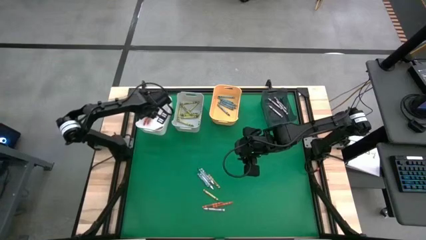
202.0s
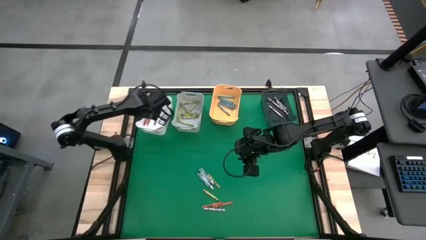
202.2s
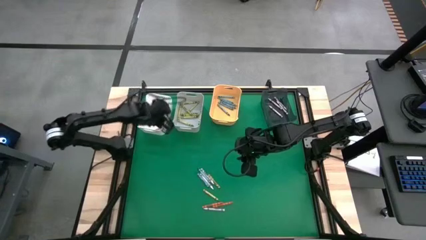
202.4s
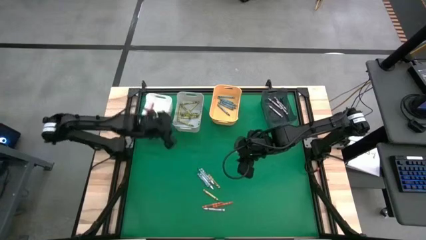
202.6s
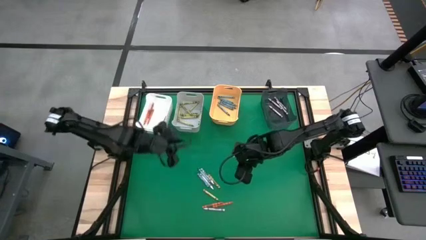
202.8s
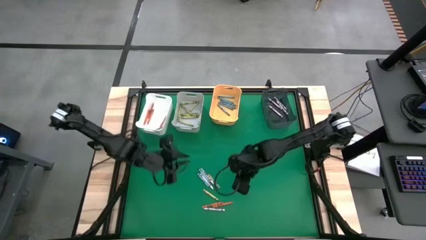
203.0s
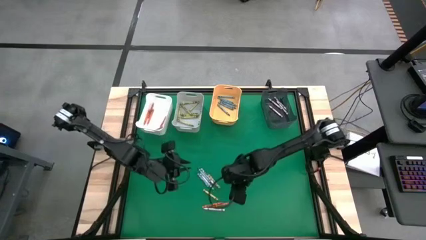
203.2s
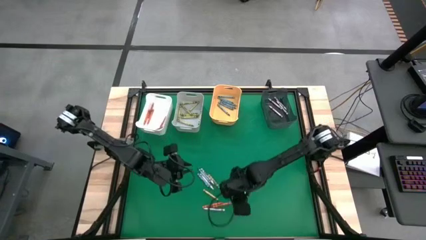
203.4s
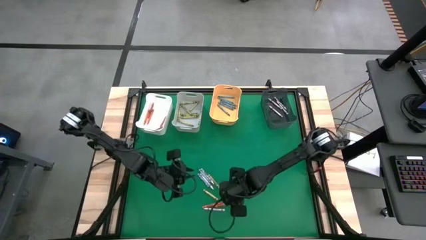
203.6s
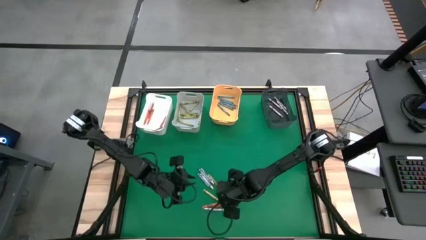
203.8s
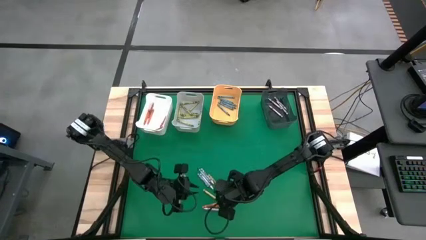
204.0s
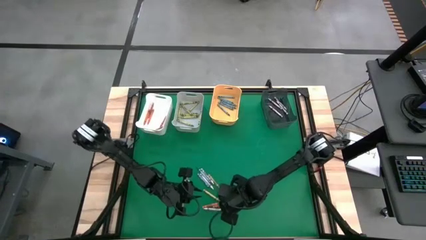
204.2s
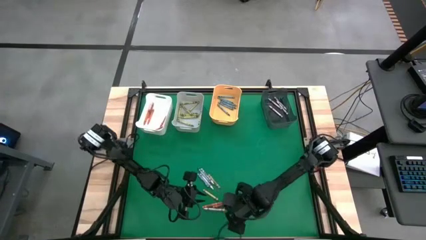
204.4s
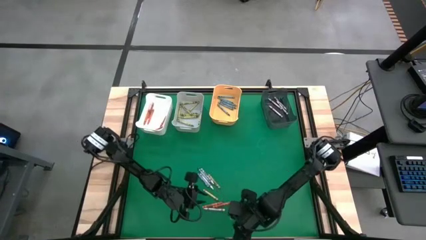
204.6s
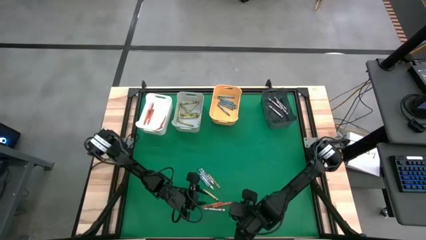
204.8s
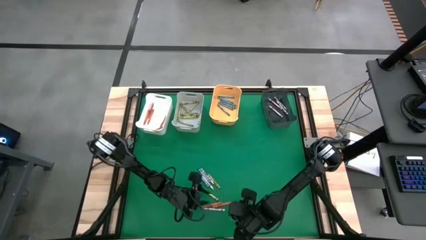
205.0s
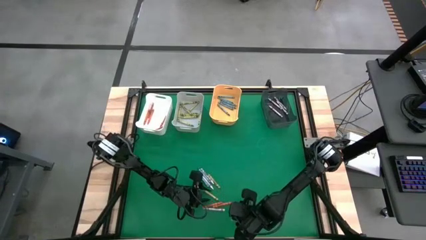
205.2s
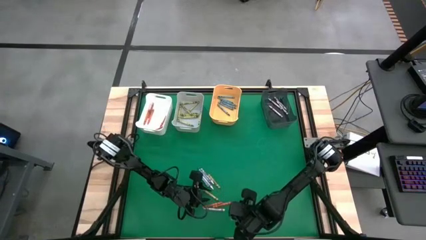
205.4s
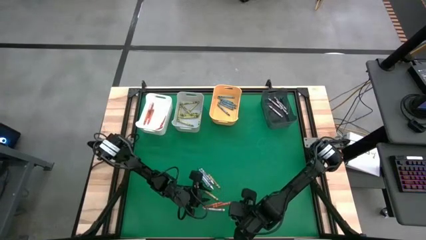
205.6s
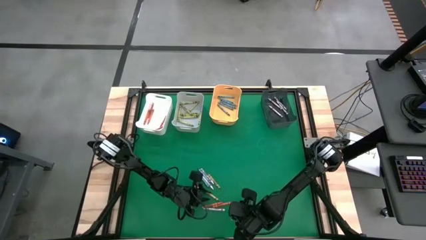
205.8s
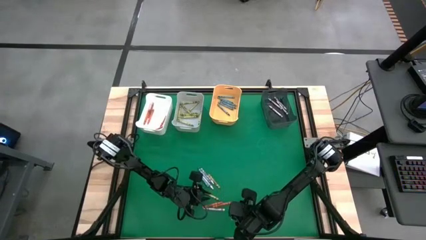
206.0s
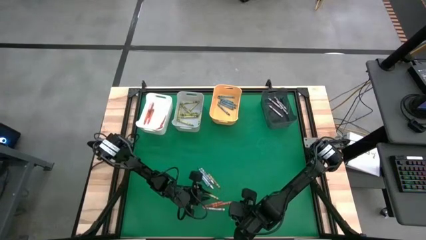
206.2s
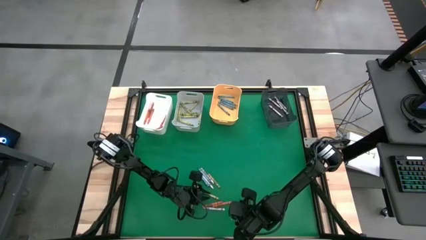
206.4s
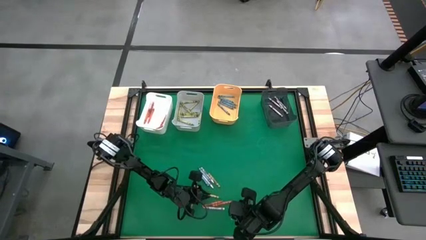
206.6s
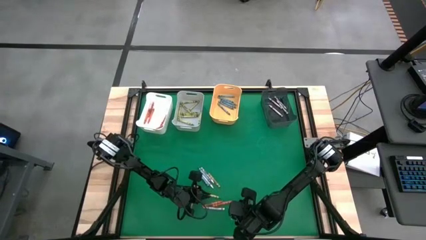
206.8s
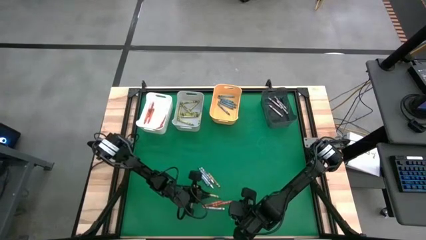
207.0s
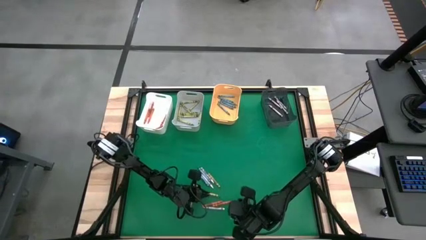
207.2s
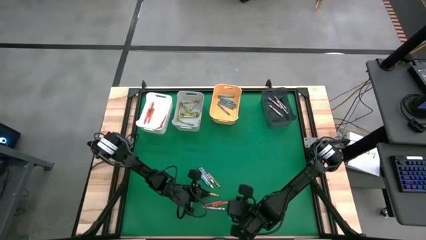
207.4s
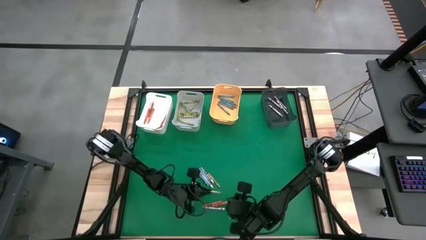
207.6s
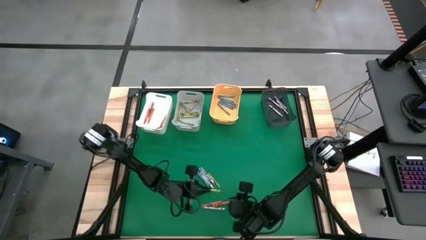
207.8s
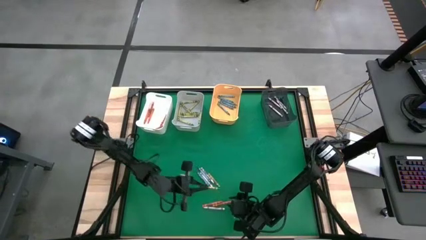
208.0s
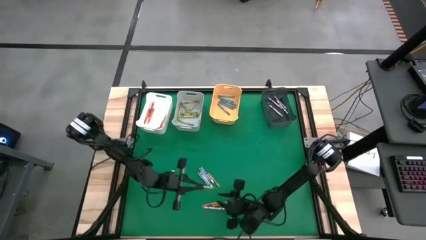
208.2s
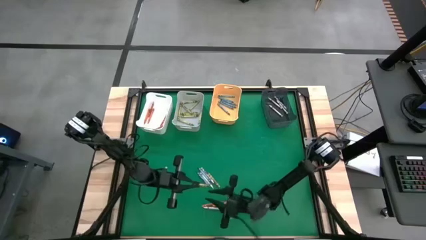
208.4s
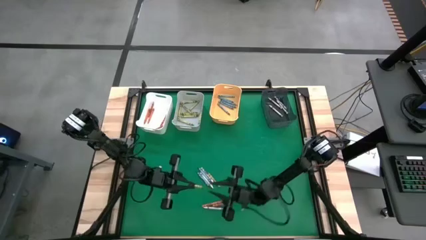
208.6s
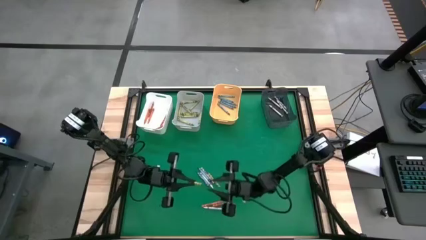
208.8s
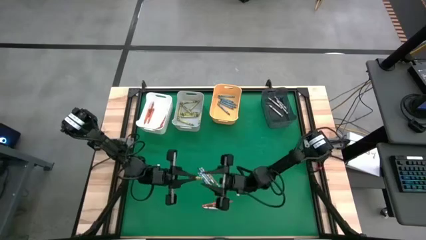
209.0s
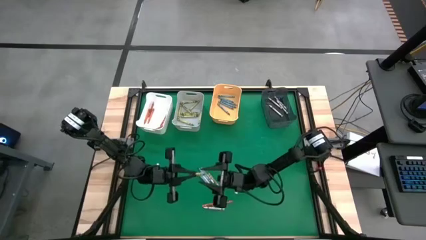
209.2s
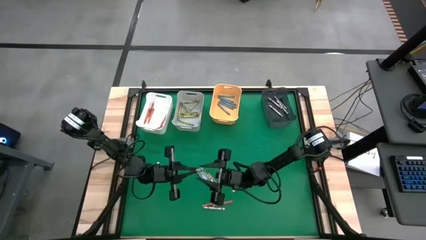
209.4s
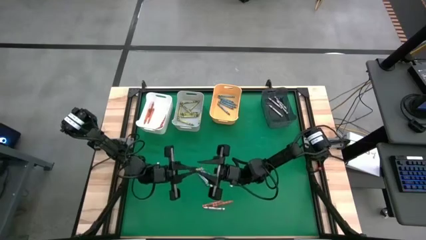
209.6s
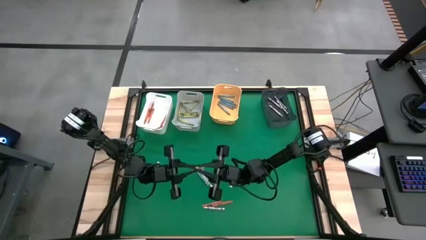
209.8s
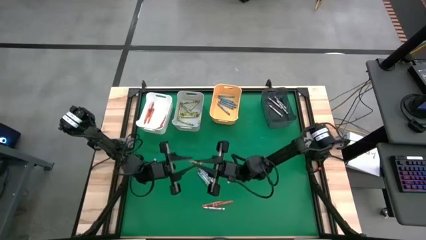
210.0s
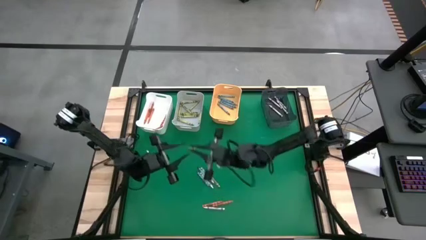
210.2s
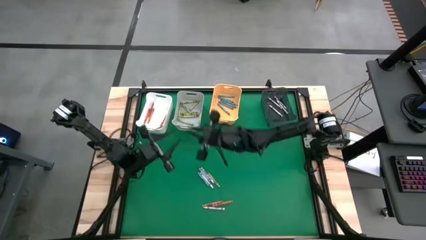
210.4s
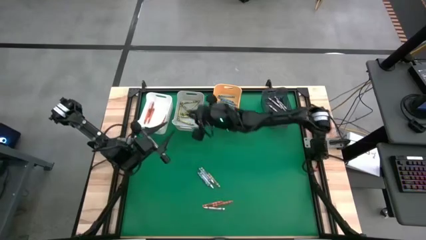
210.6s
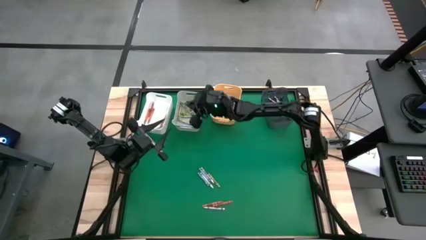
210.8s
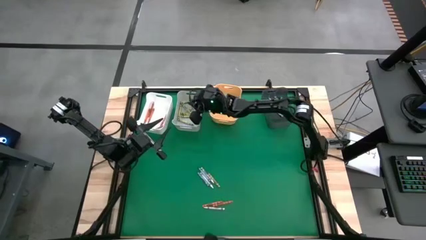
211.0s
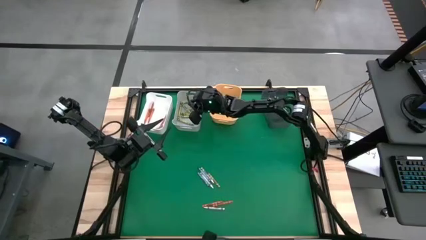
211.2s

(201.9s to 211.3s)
Task: Sort crayons
Put the green crayon into the gray bin

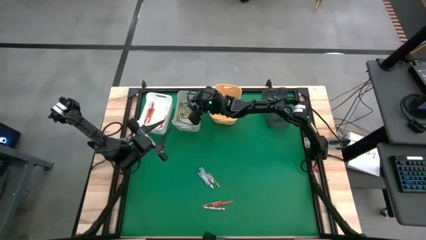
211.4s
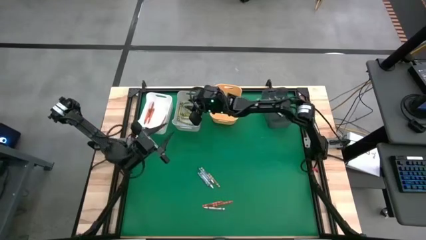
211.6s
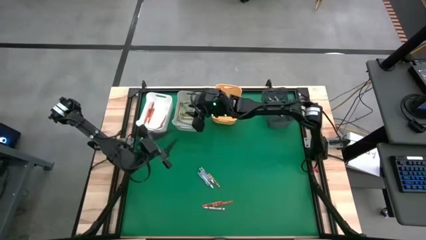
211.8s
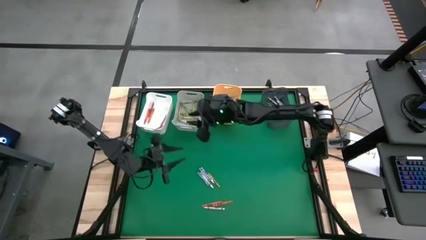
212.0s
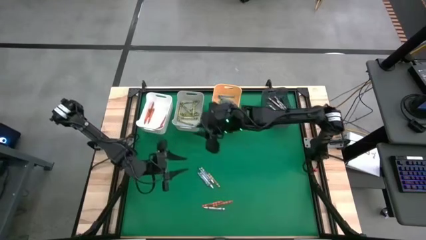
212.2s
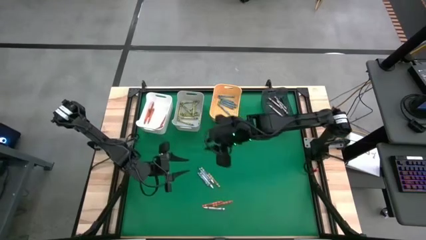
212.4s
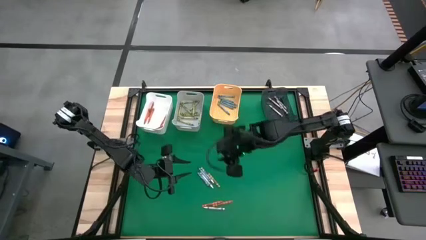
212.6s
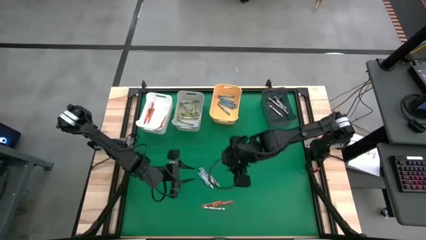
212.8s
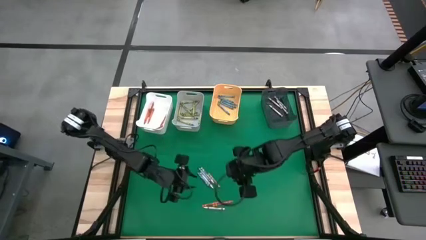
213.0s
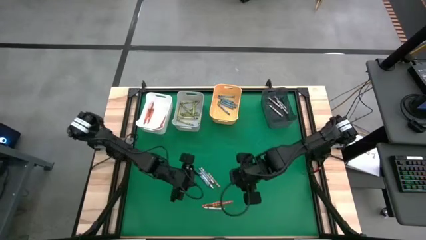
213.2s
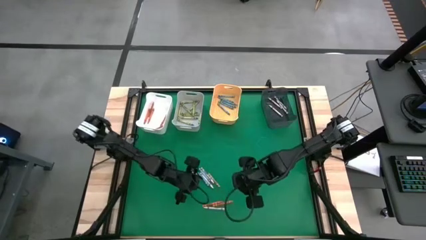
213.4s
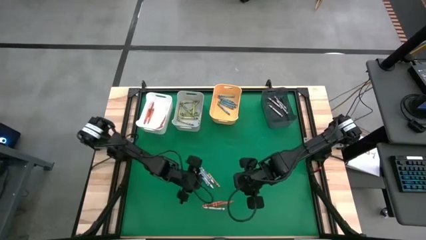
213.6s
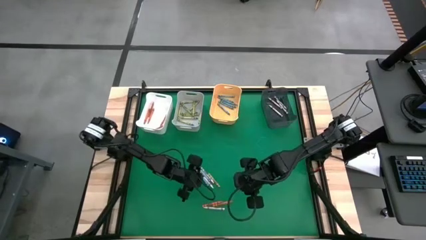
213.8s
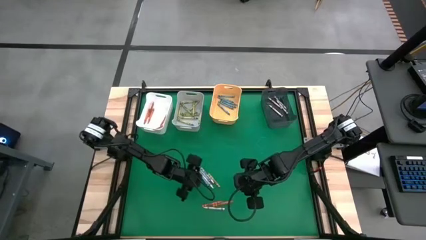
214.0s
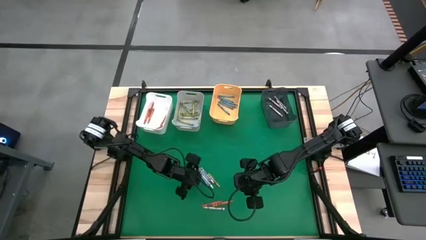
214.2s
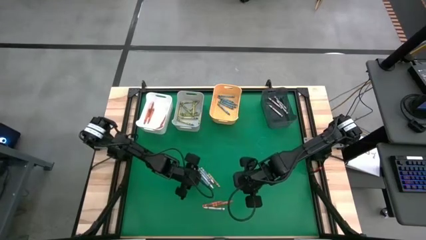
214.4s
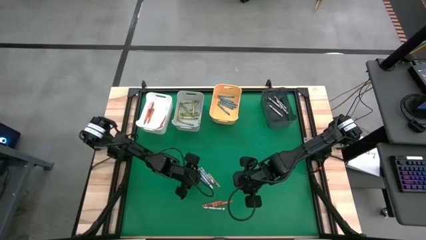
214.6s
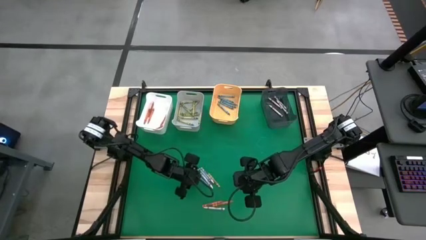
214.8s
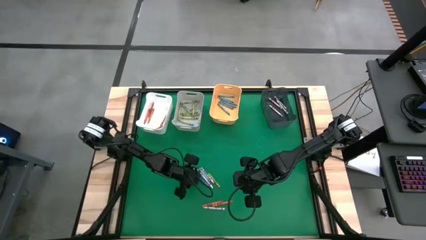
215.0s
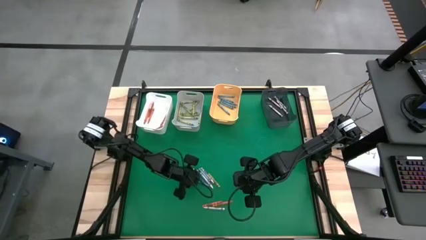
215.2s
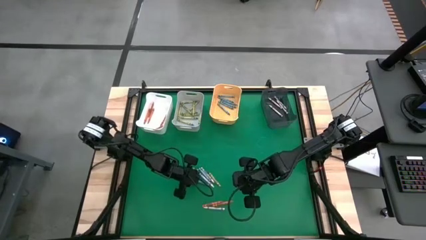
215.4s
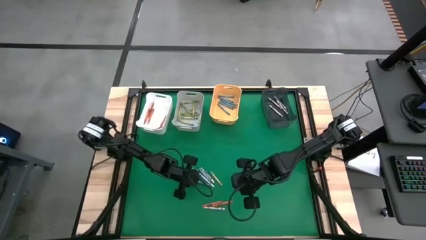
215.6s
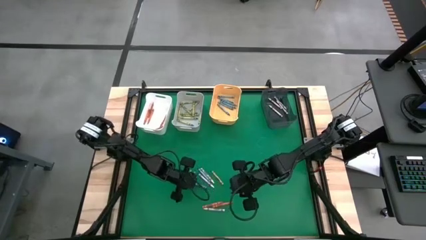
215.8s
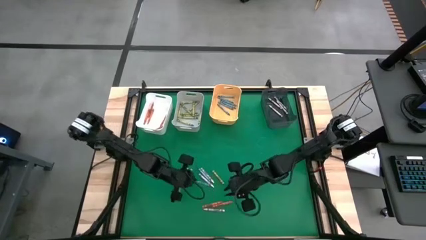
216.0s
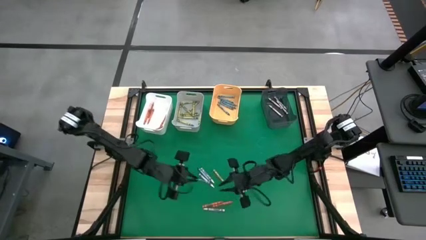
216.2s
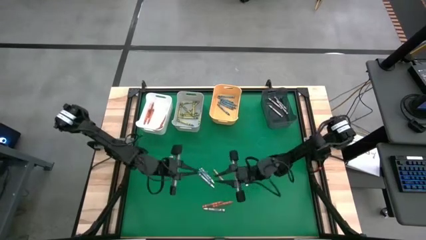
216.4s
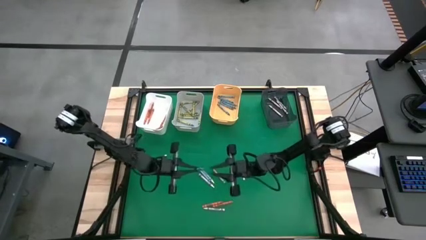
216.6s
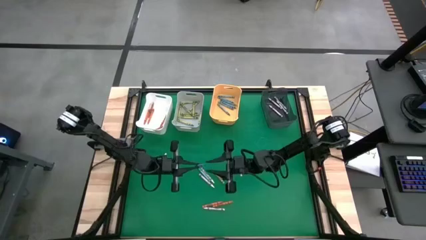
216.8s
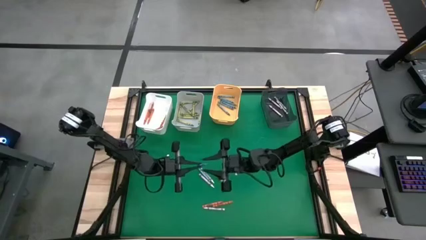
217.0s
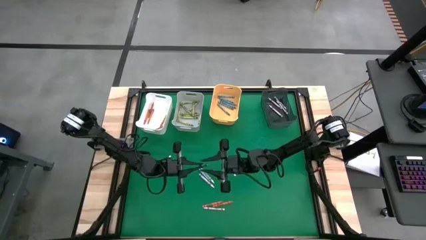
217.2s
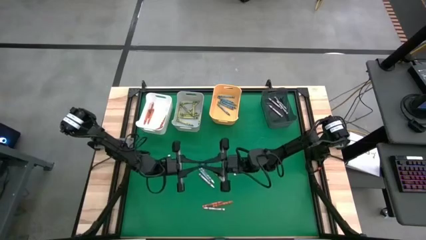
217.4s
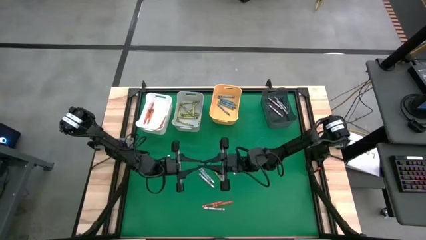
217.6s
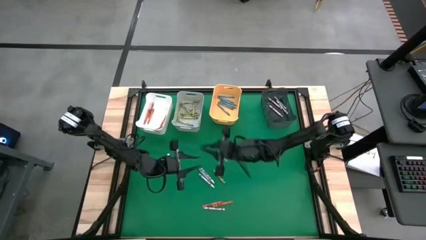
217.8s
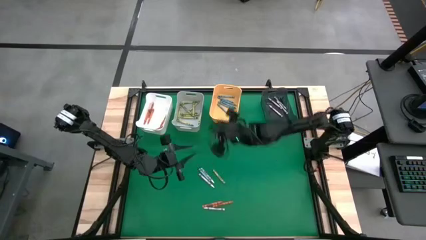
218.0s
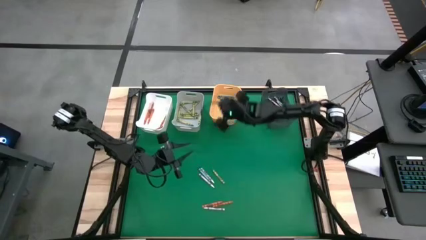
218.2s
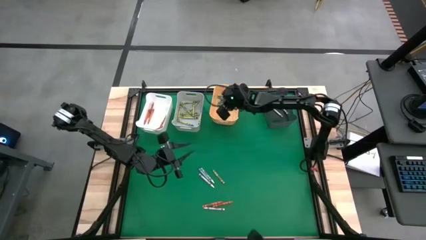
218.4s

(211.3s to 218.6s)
Put the blue crayon into the yellow bin

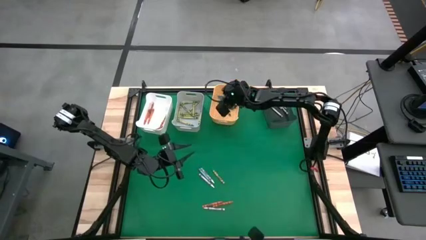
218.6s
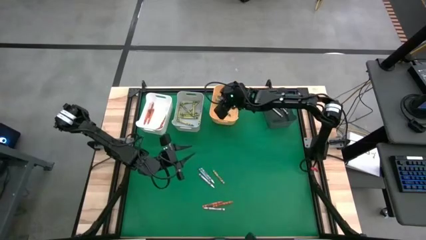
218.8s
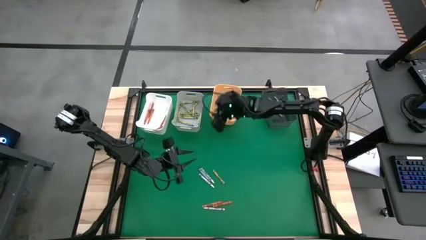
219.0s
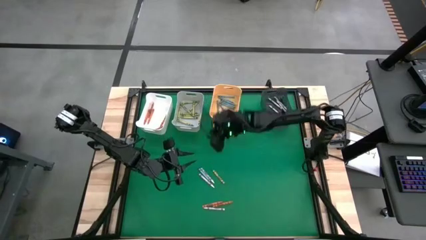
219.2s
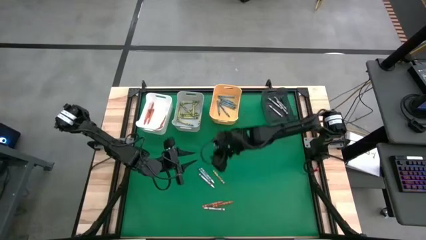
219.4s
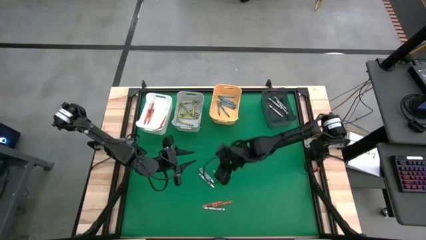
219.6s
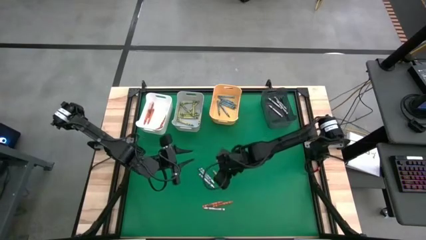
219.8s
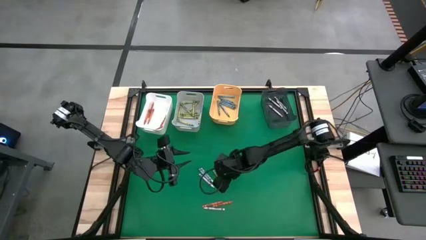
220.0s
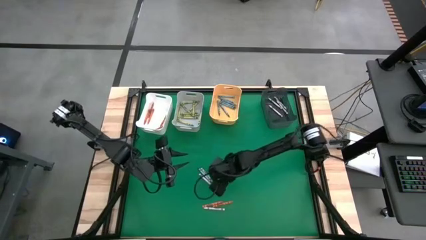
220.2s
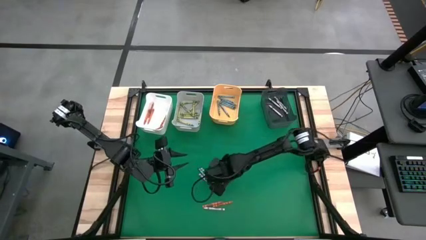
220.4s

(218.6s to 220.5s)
Put the green crayon into the gray bin
